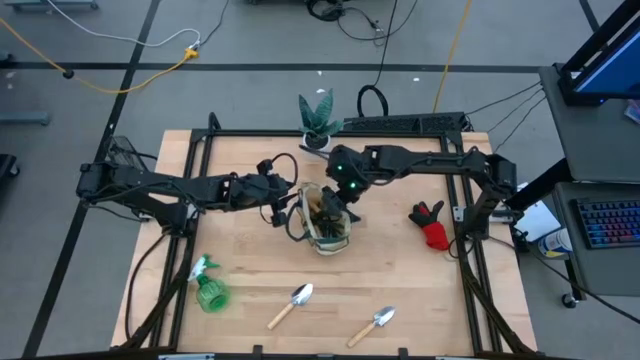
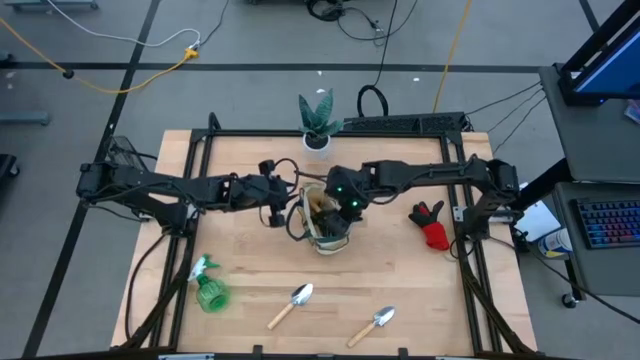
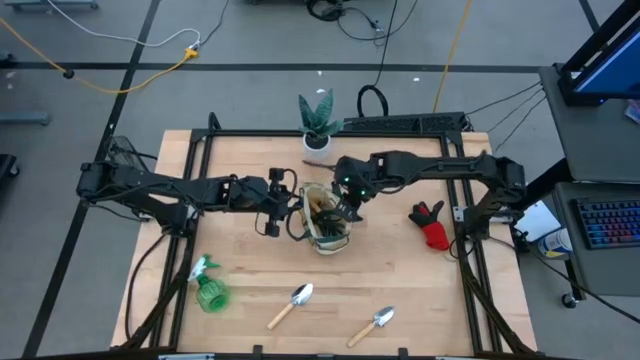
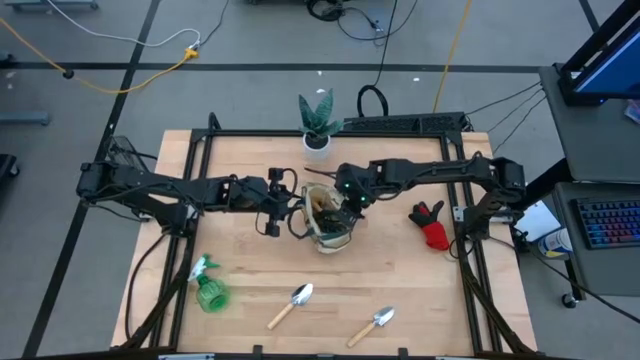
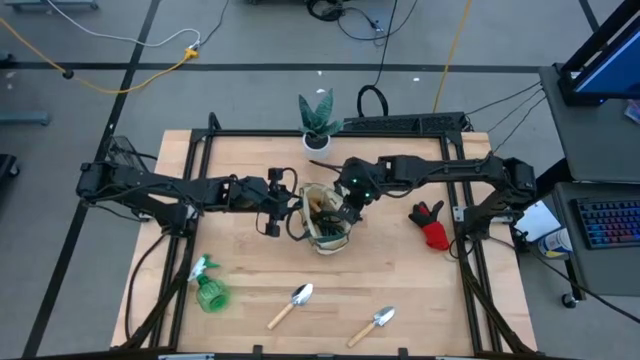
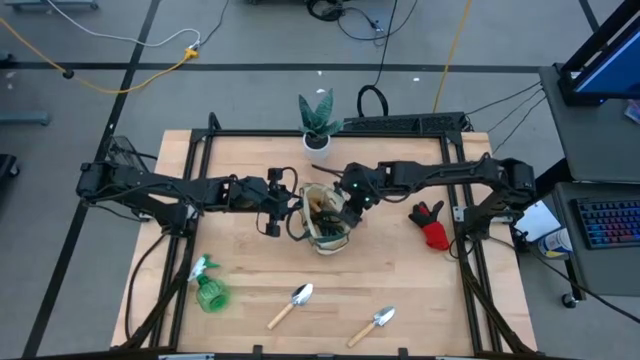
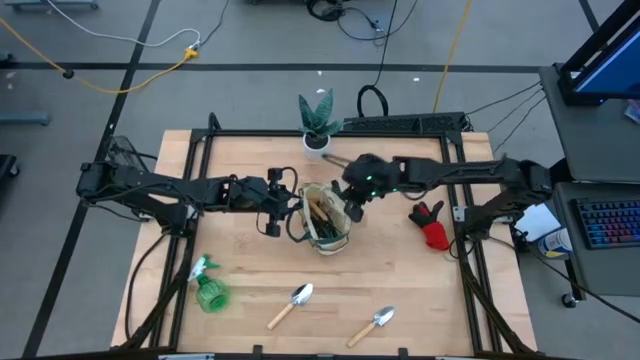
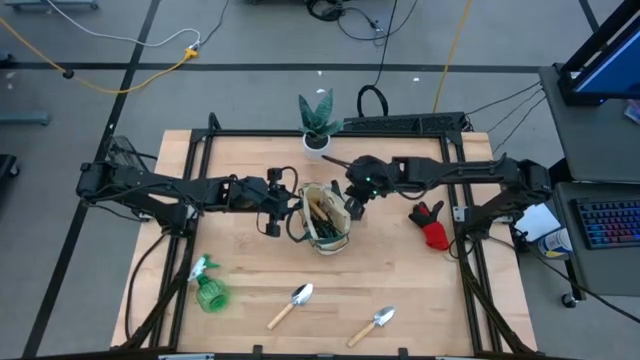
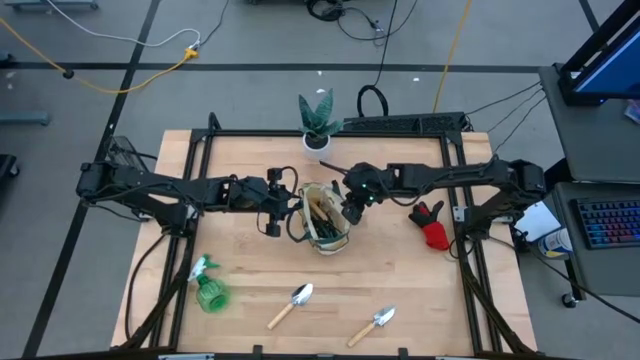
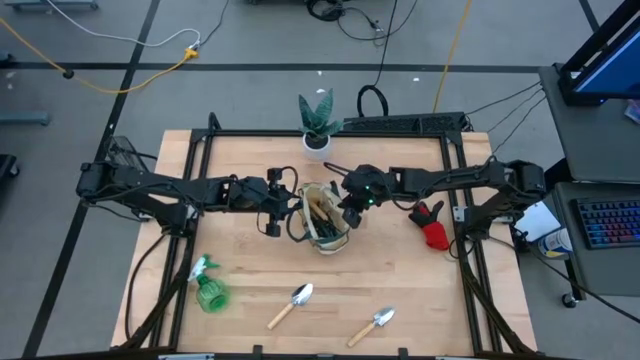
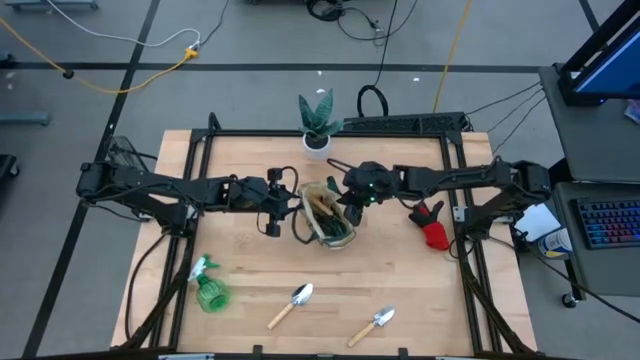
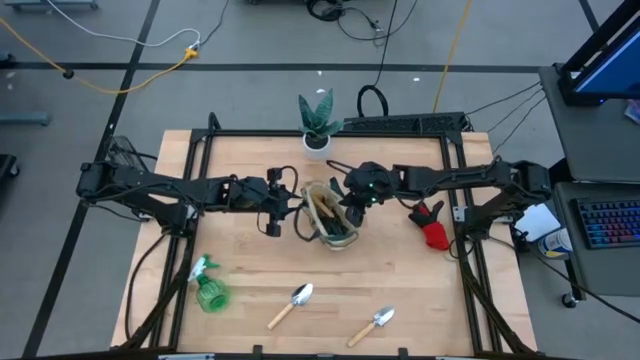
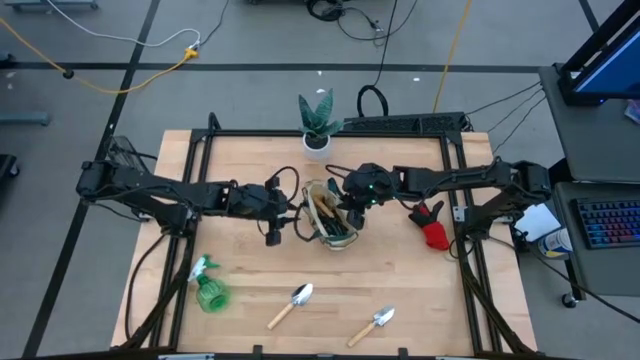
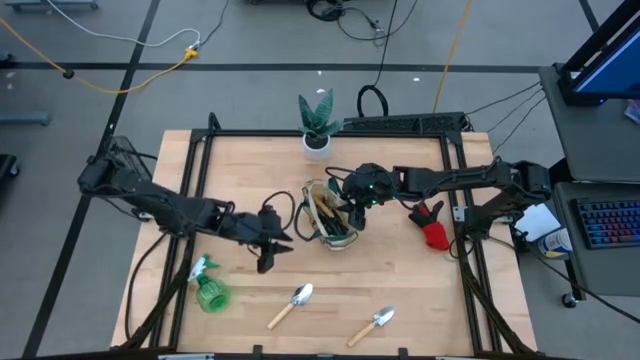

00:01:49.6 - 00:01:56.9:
Task: Pick & Place Garden tools in Gardening bag
Adjust the gardening bag

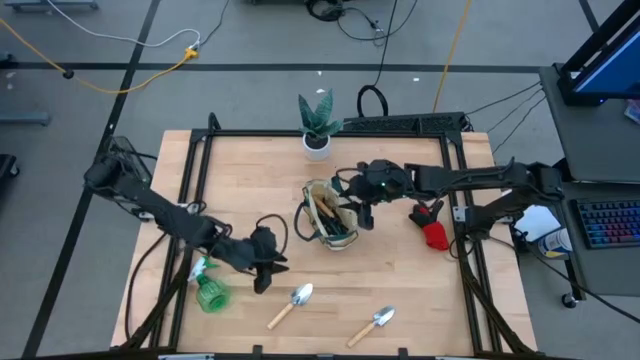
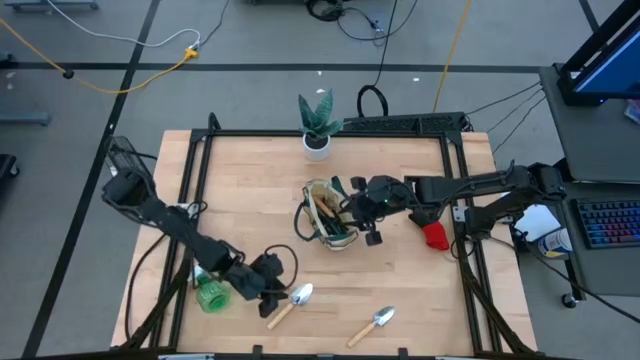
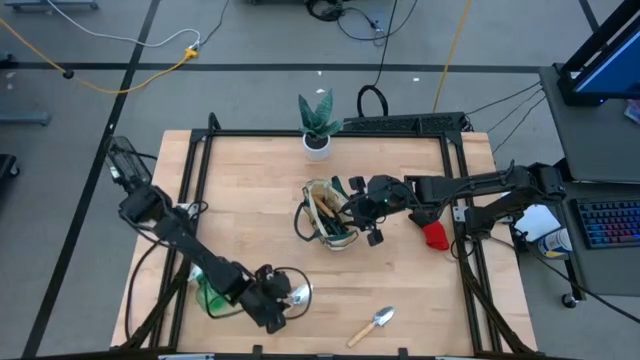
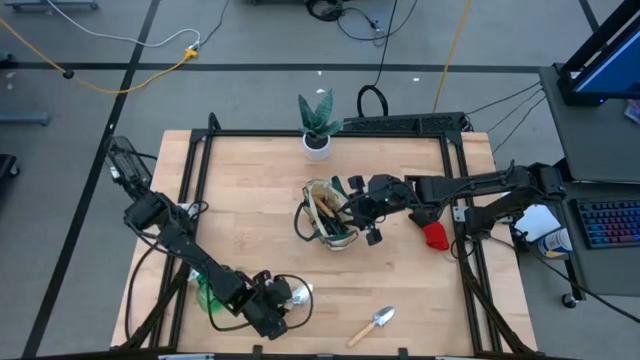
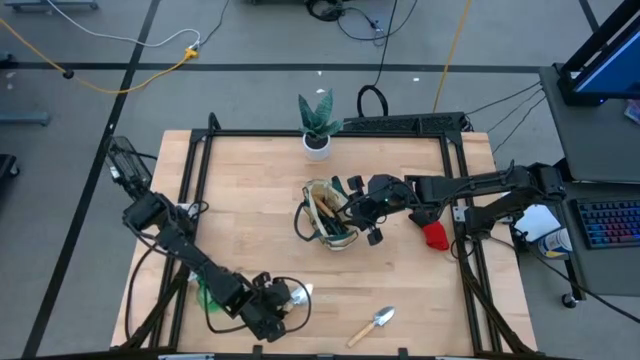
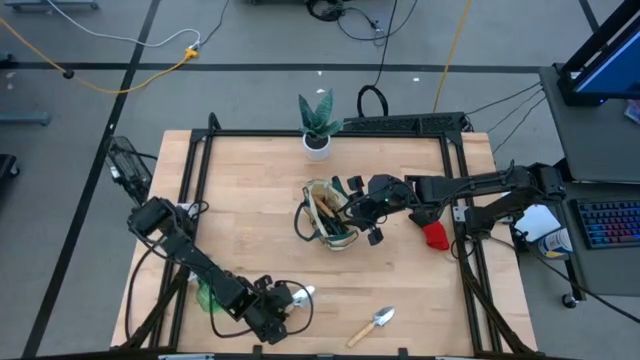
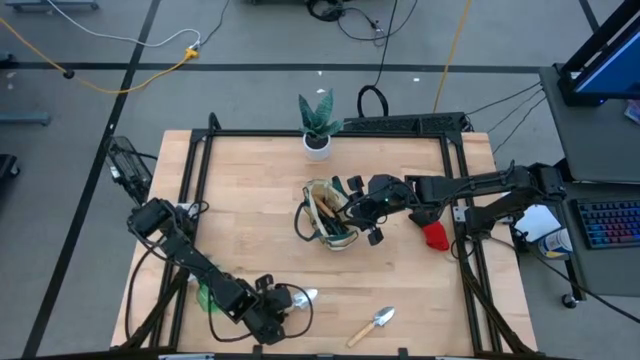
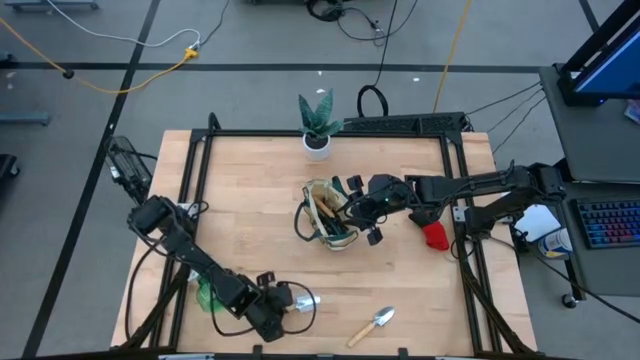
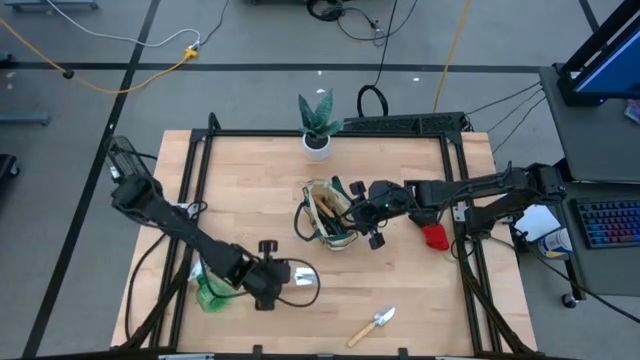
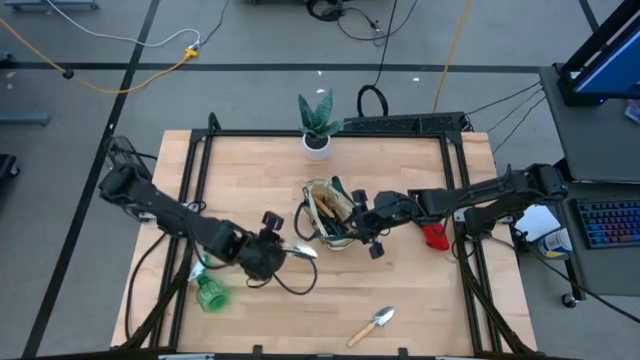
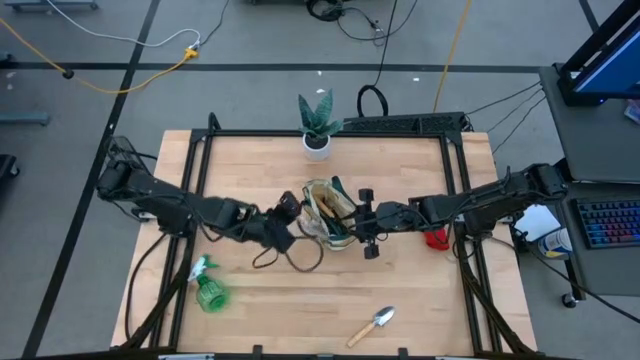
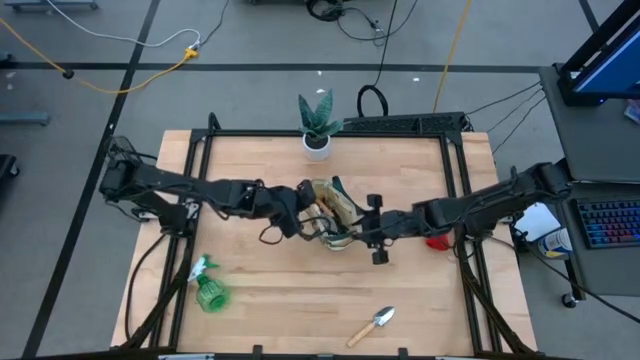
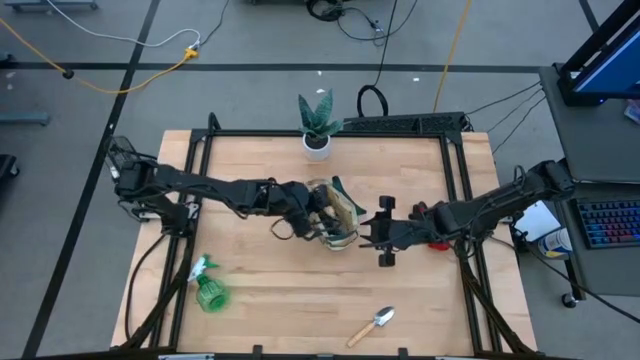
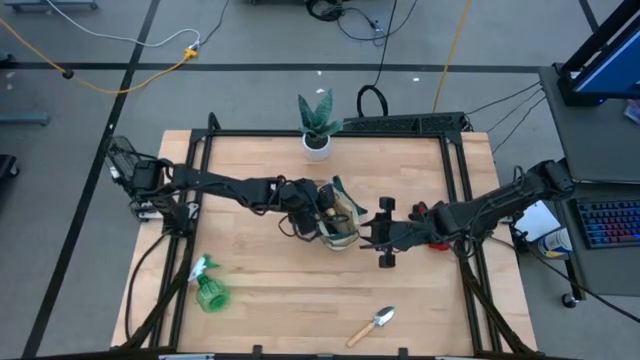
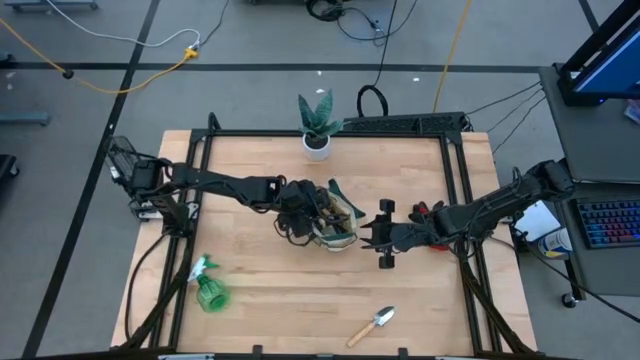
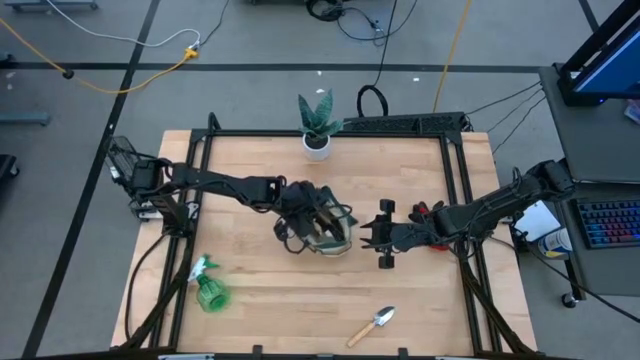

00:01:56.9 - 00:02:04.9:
Put the left brown trowel into the gardening bag

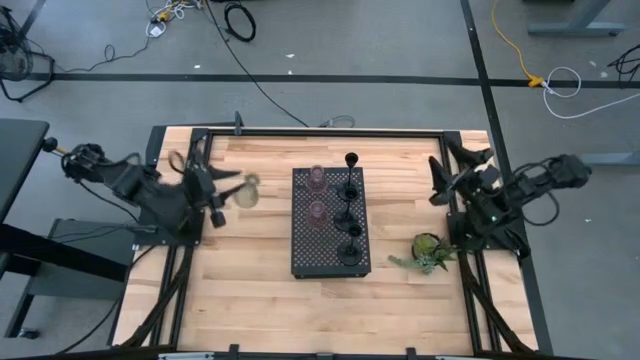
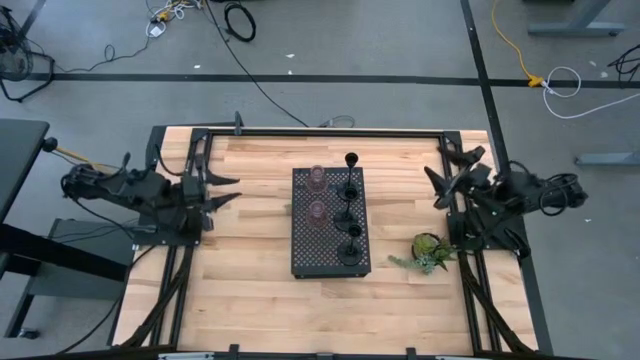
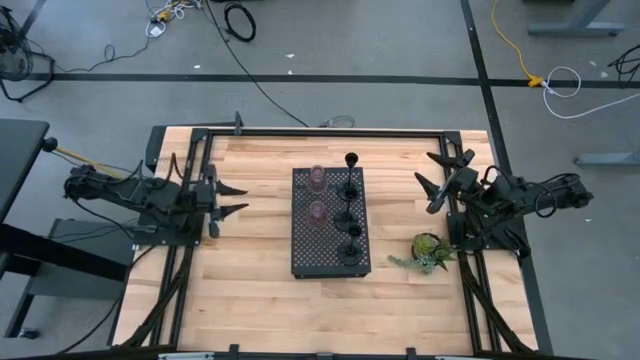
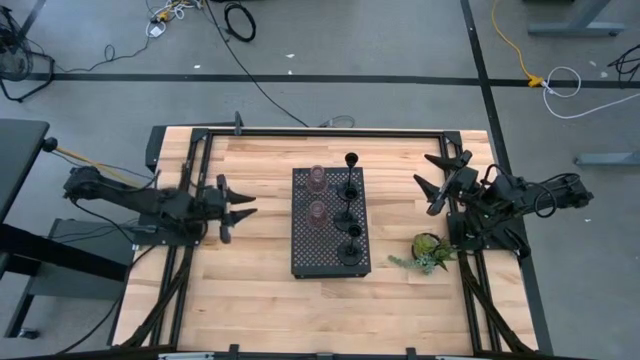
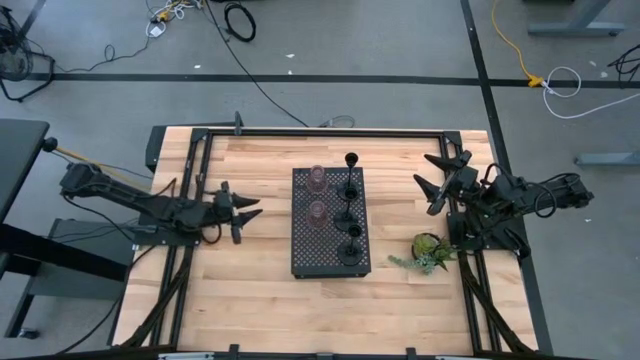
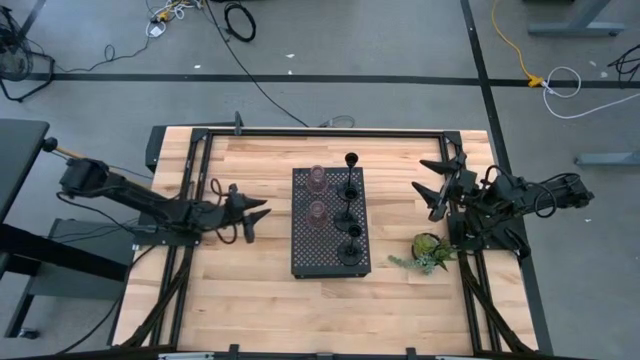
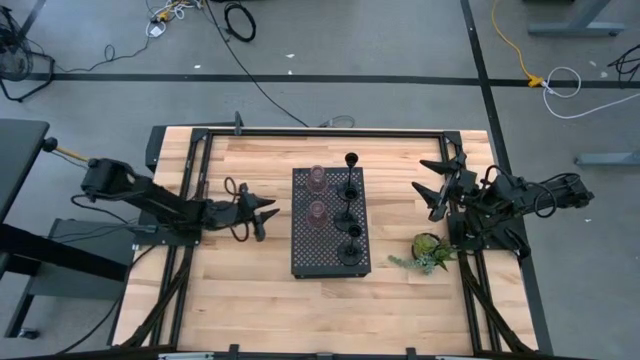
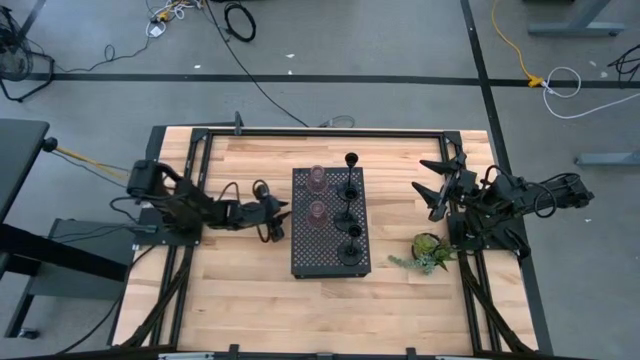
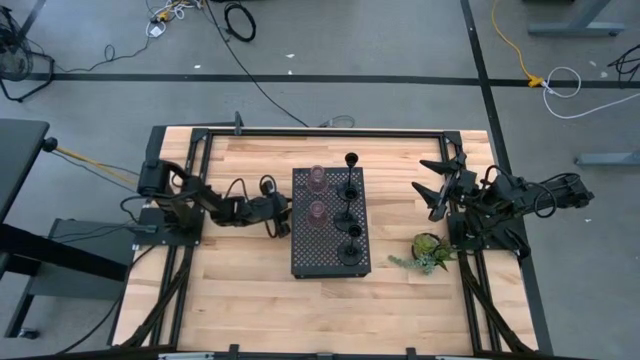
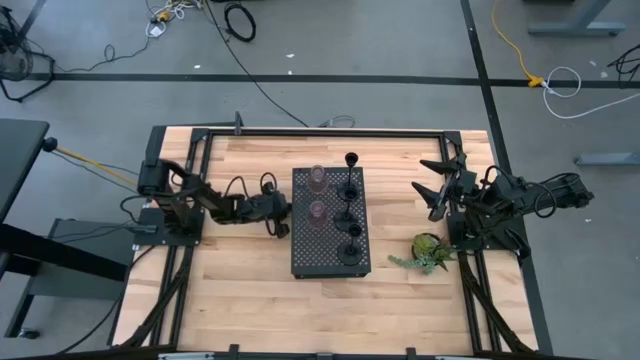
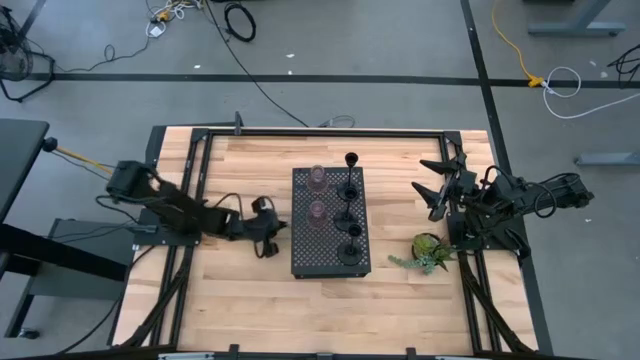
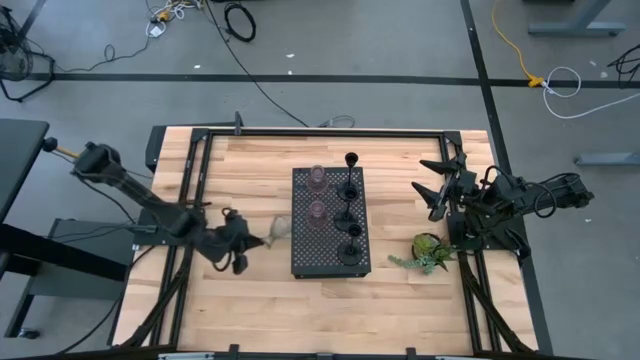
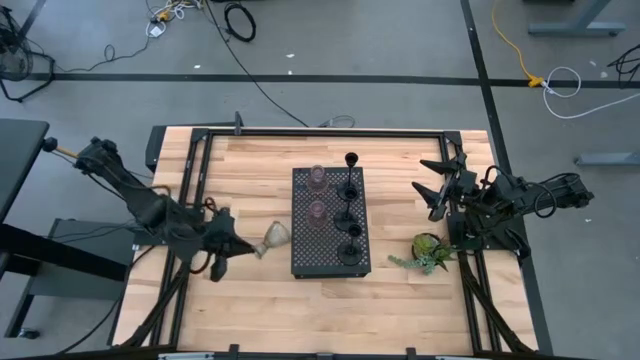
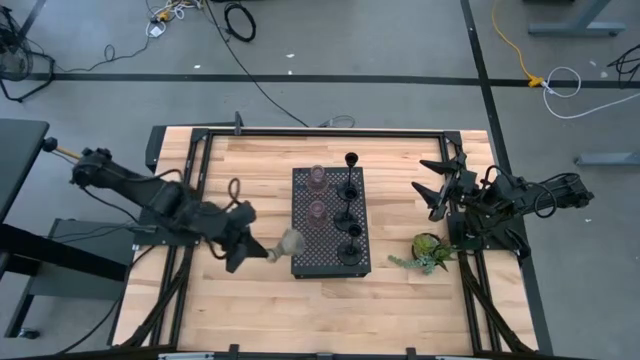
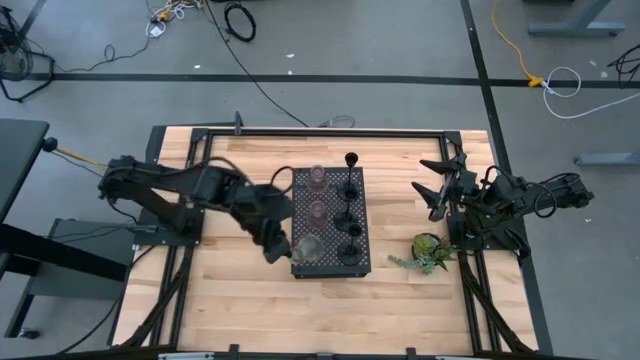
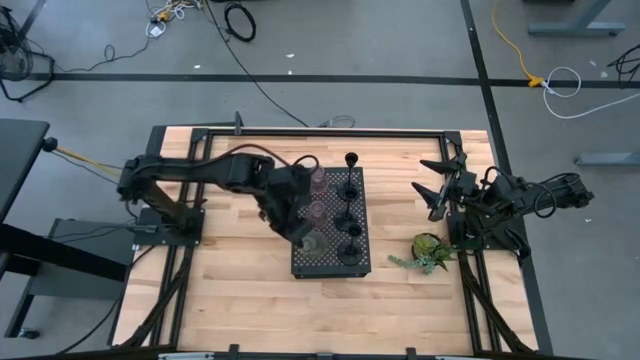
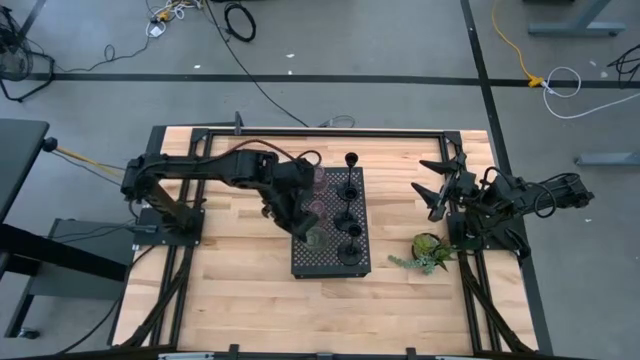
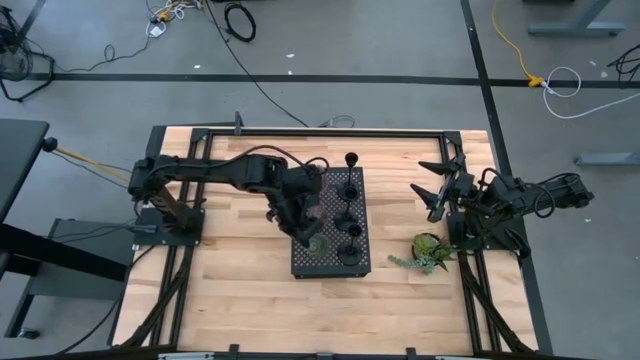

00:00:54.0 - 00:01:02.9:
Task: Pick & Place candle stick holders
Put the green glass candle holder on the shelf
